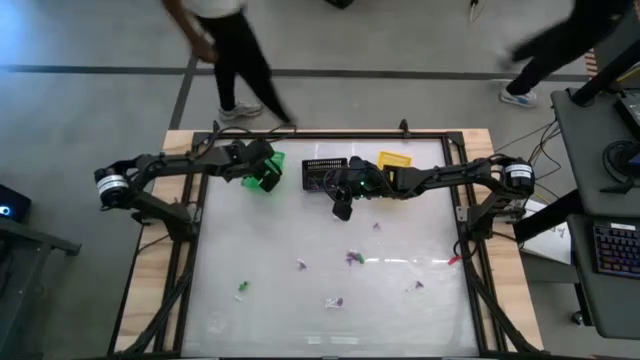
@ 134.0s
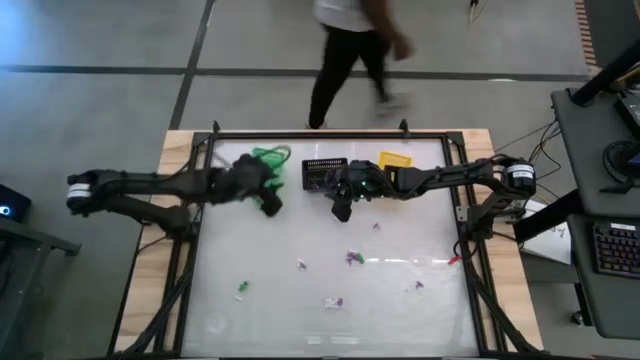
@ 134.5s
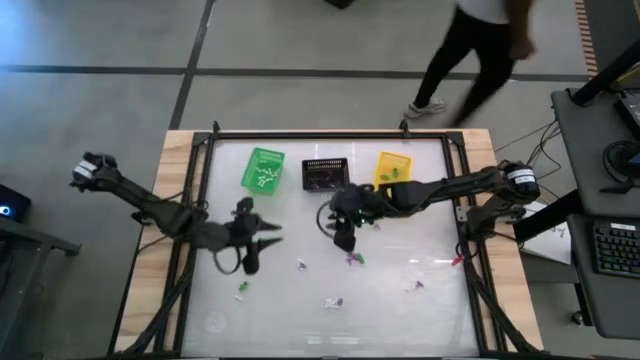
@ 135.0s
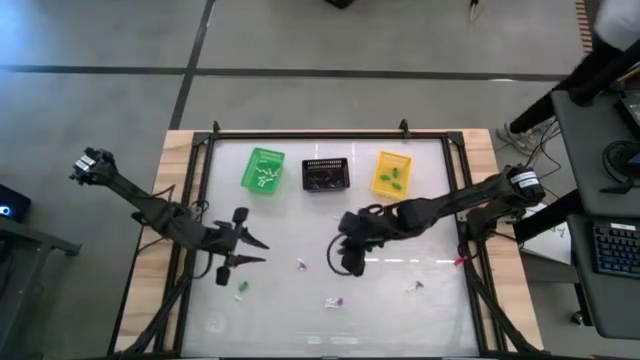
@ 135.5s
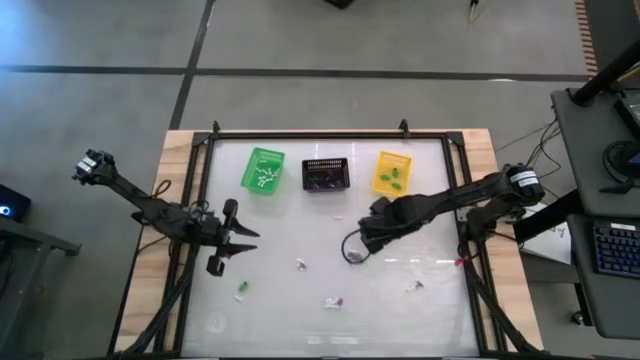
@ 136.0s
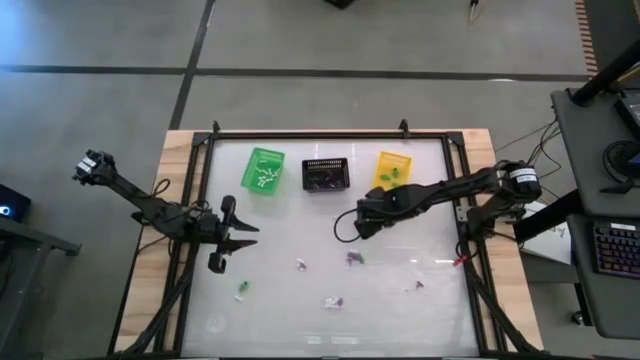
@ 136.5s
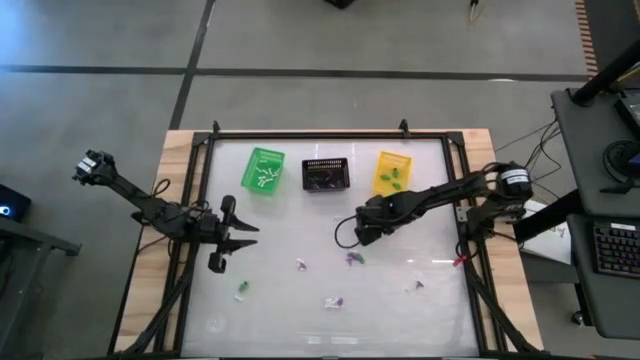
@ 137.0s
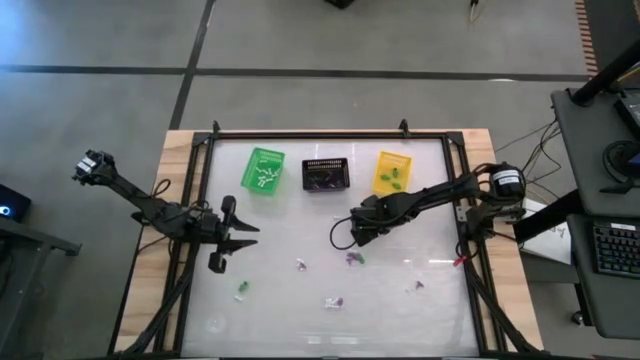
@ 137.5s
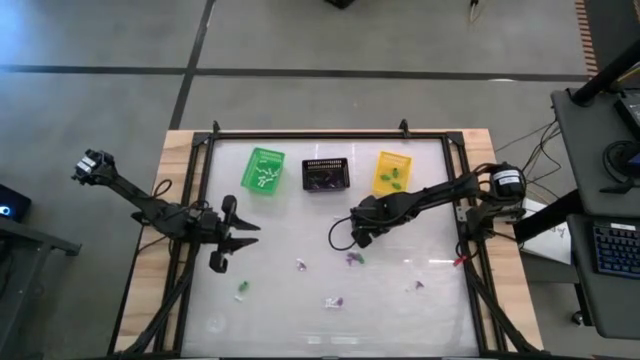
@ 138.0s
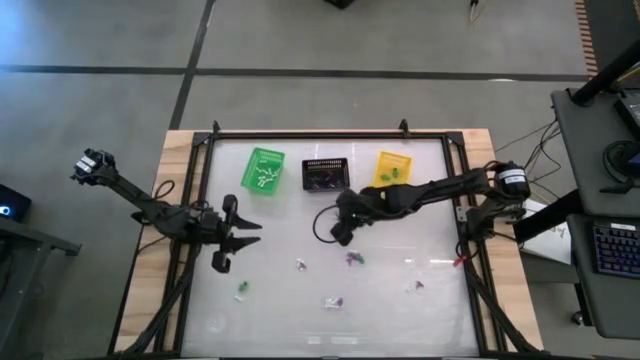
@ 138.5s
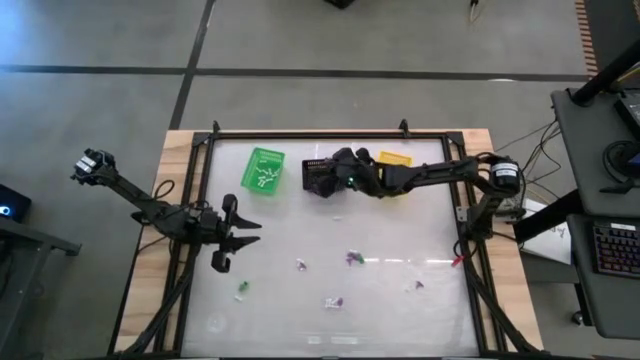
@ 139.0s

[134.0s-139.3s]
Task: Sort Halloween decoration
Put the purple witch hat toy into the black basket

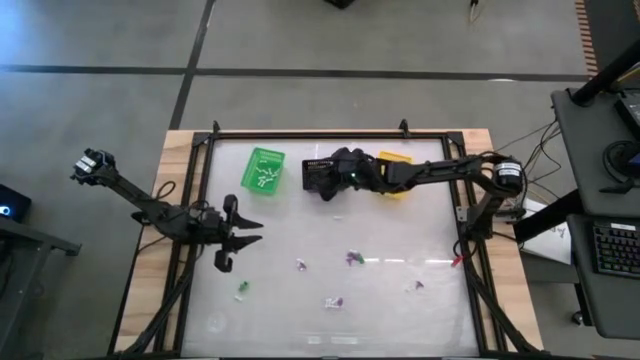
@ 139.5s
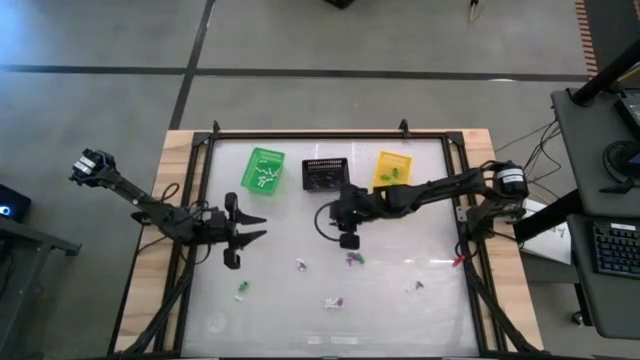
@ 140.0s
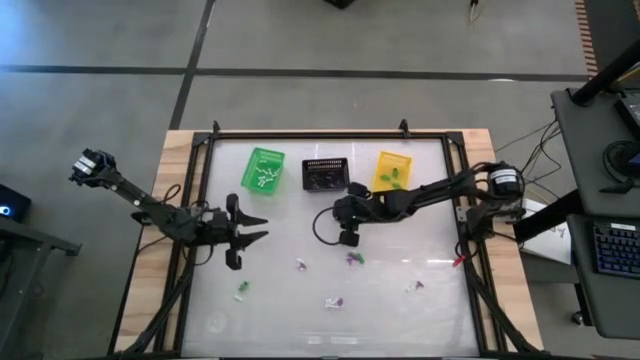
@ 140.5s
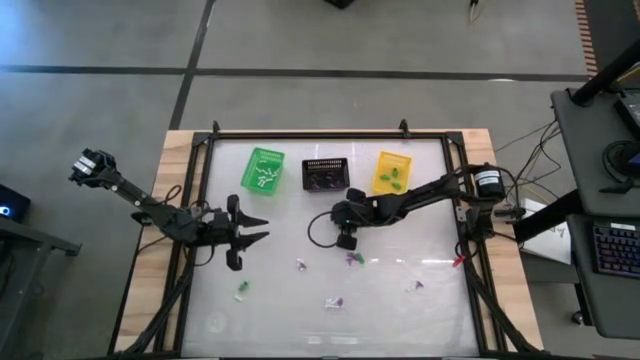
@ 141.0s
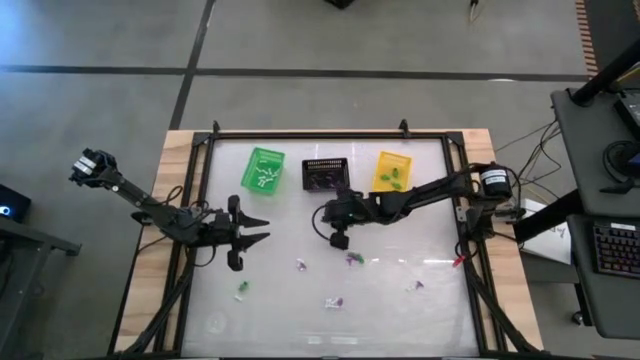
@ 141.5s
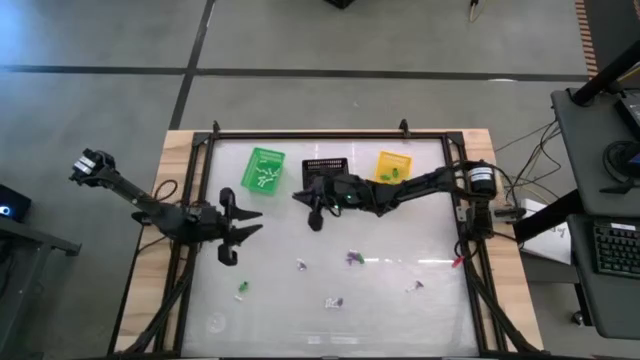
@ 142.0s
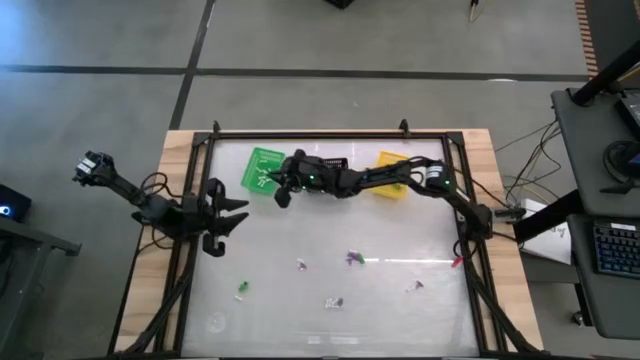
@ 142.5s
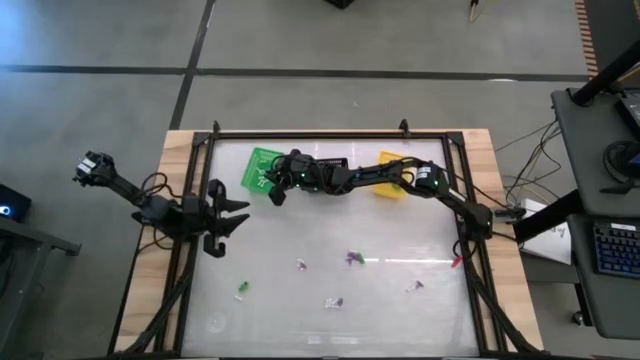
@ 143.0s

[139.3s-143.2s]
Put the white bone toy into the green basket

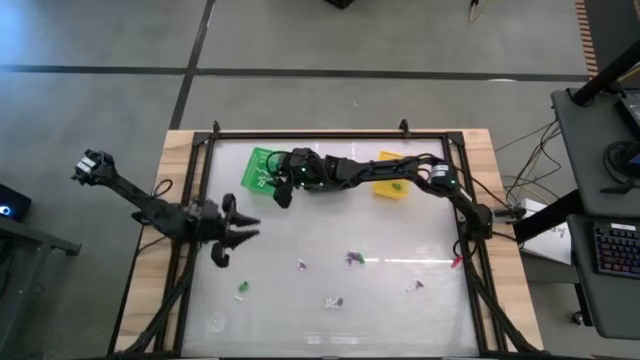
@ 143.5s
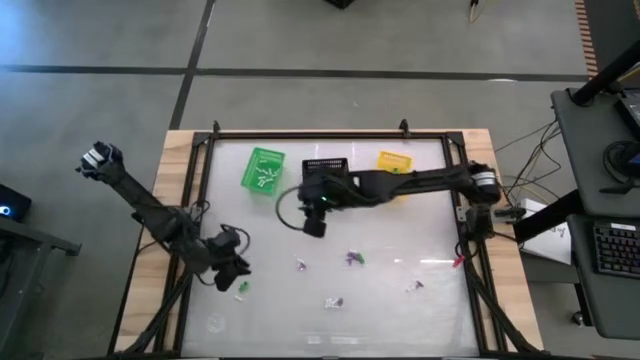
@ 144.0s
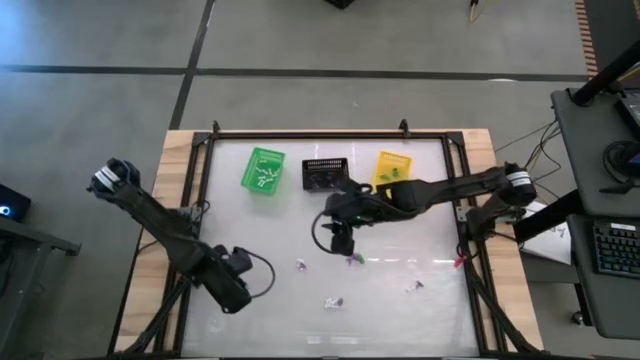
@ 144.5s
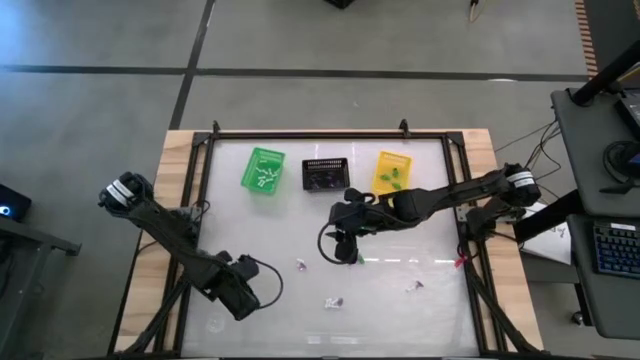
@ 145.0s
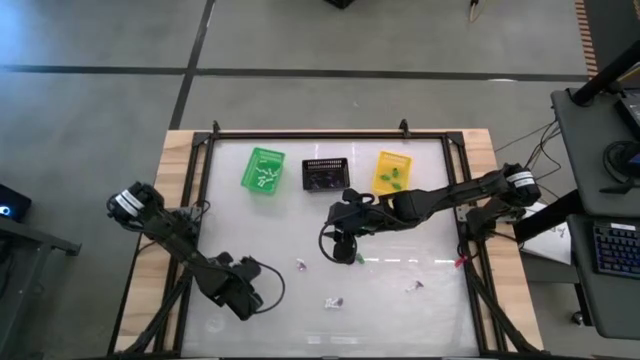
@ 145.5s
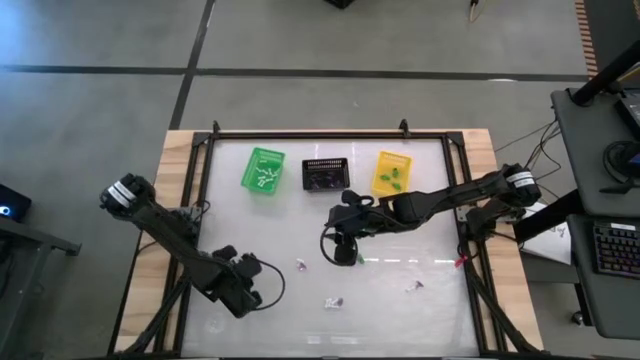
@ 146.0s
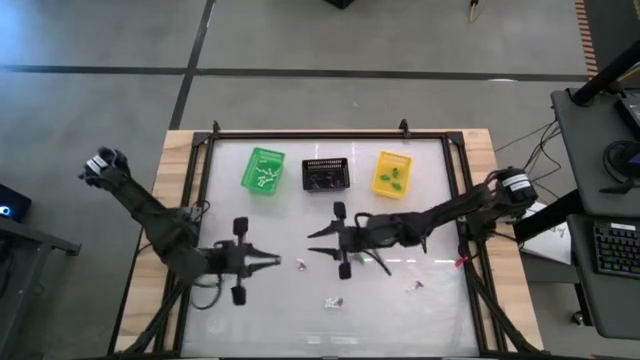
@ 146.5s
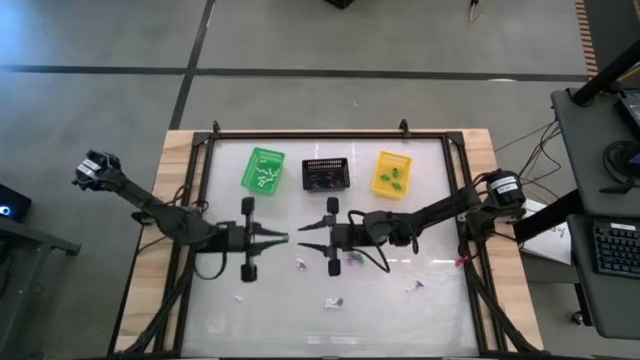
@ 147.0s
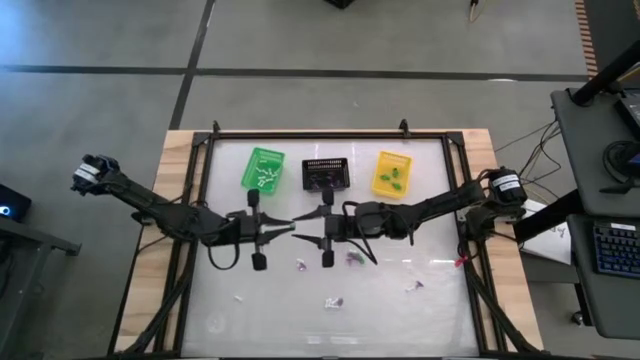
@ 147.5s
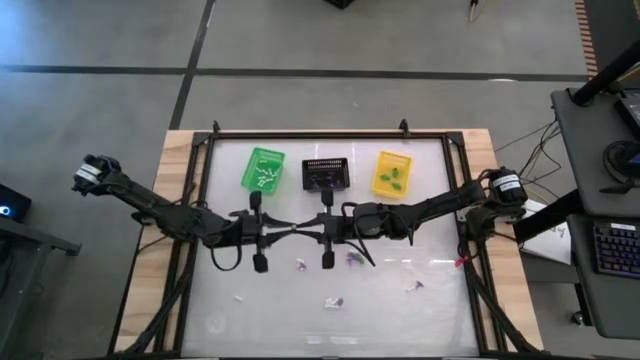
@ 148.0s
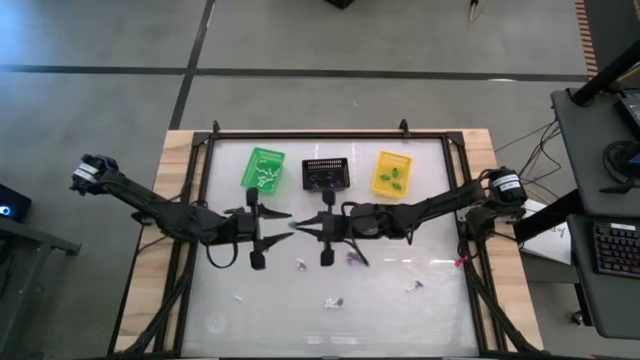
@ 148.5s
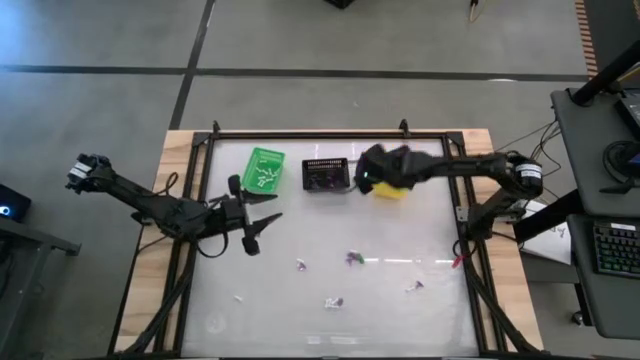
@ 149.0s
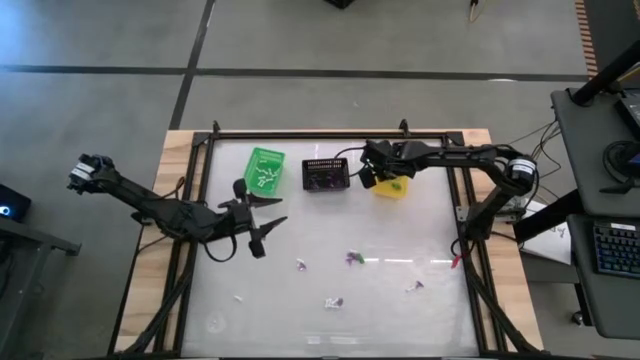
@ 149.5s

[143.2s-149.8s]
Put the green skeleton toy into the yellow basket

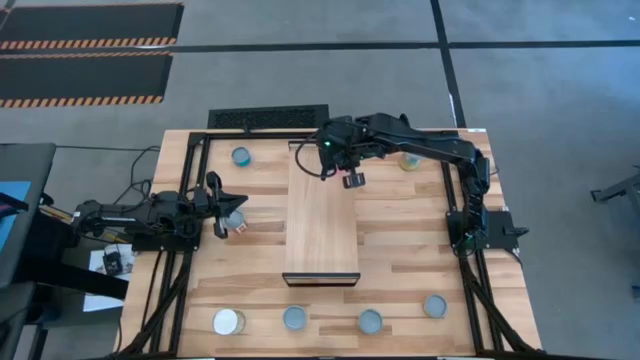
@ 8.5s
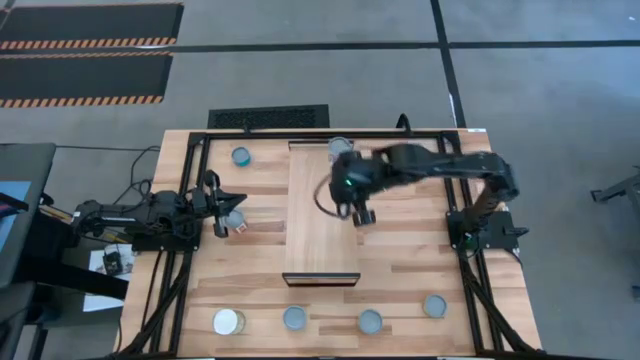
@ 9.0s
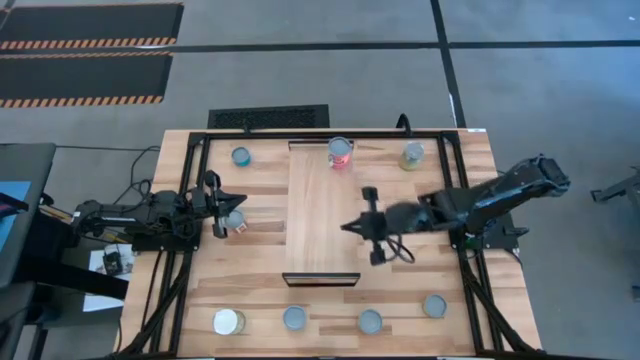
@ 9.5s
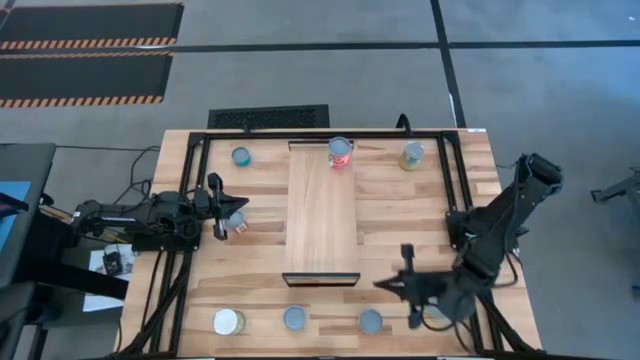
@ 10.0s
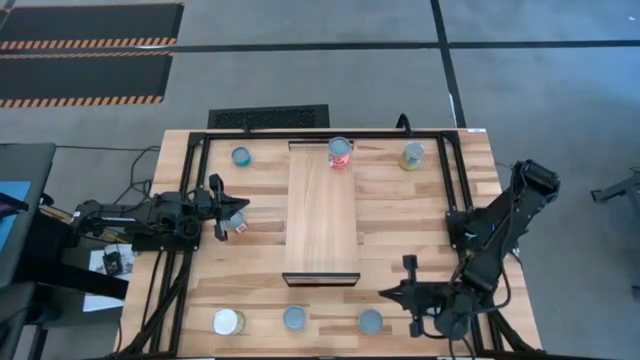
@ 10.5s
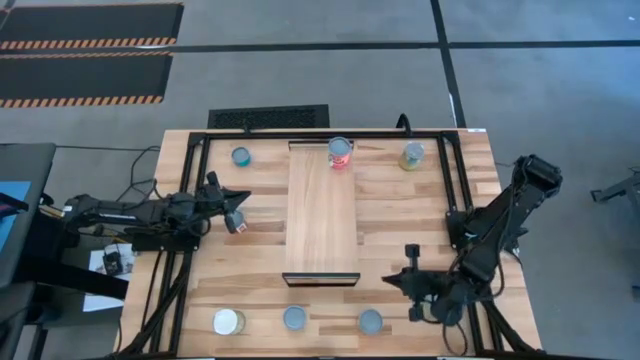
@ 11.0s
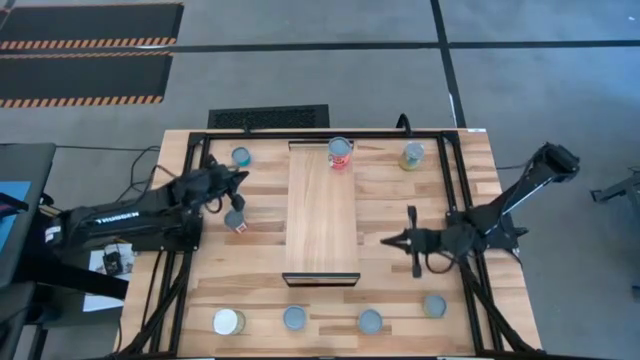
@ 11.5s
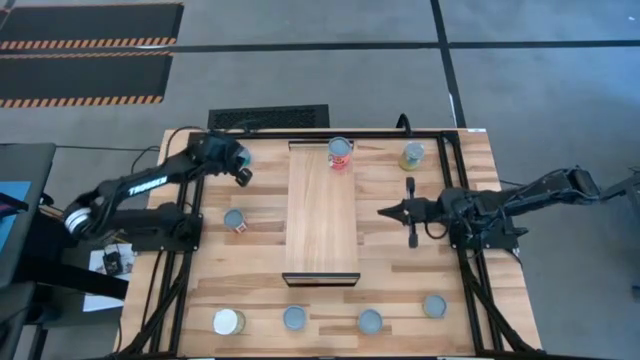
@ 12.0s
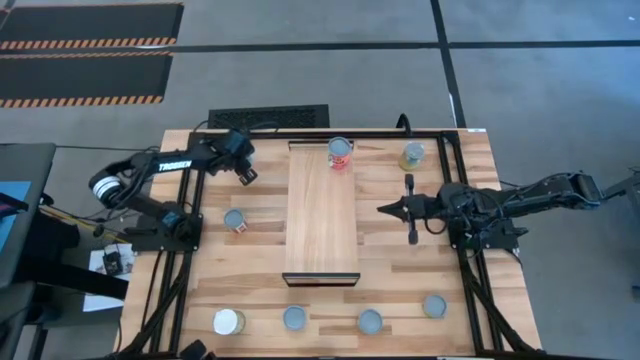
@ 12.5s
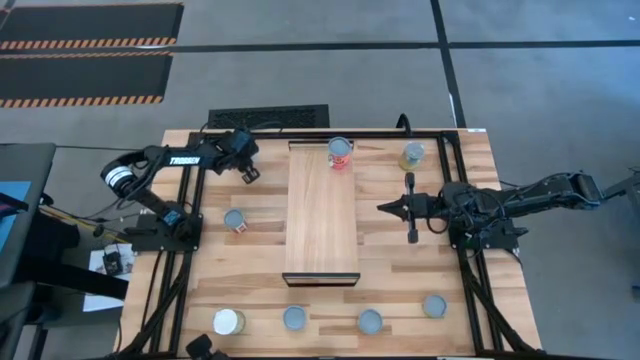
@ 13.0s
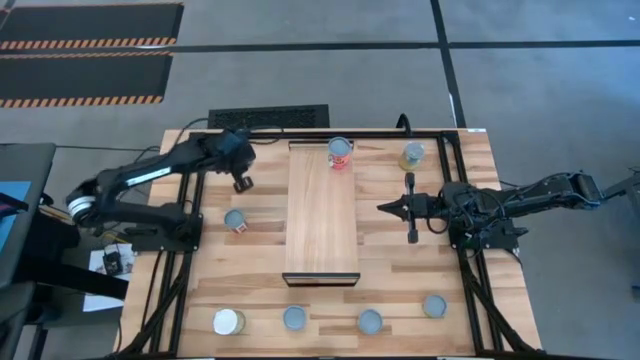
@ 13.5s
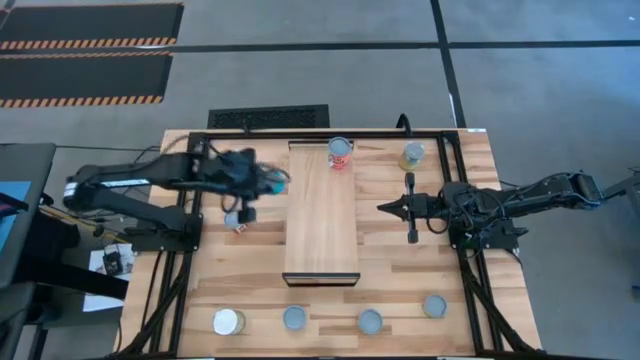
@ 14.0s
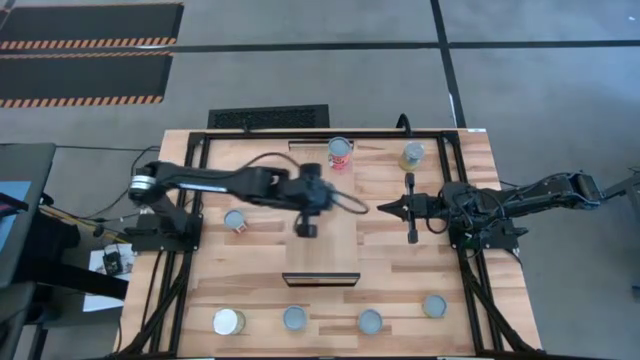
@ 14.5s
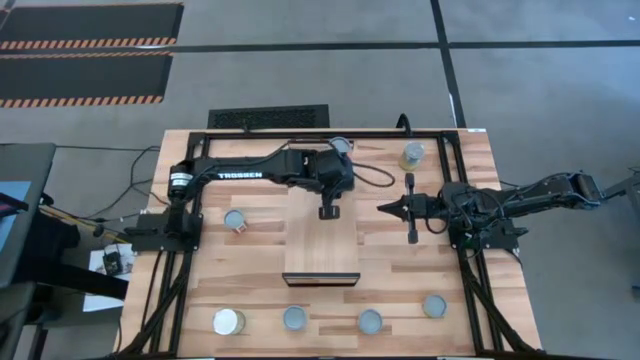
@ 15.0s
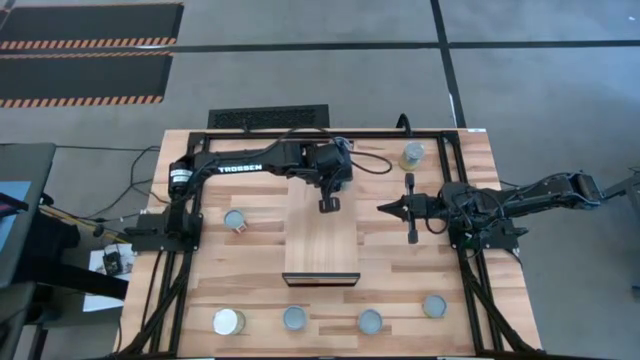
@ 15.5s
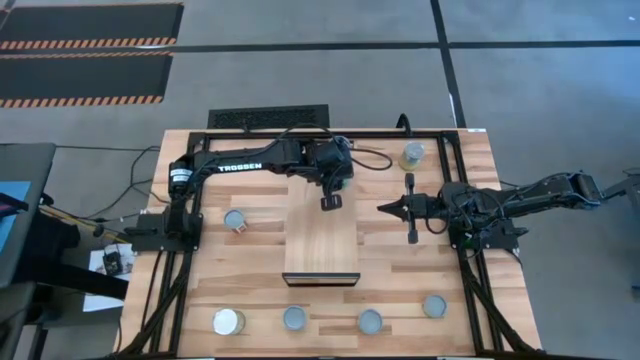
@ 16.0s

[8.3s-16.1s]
Task: Pick and place cans onto a shelf
Put the small blue can on the shelf
